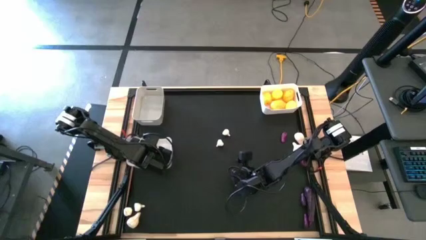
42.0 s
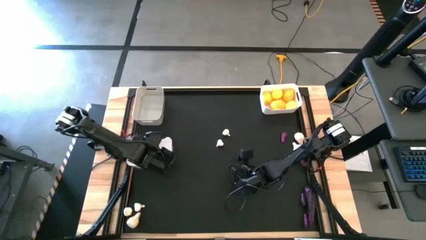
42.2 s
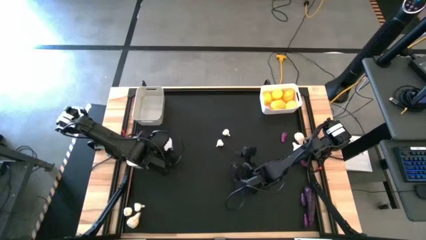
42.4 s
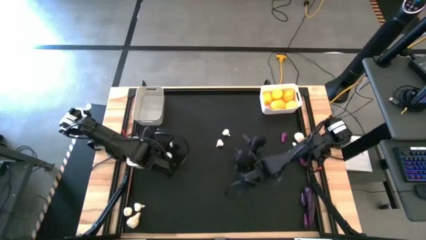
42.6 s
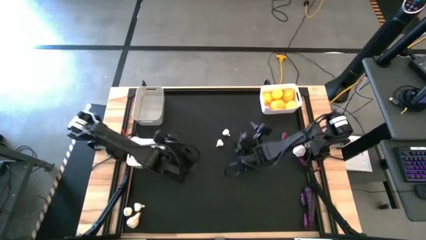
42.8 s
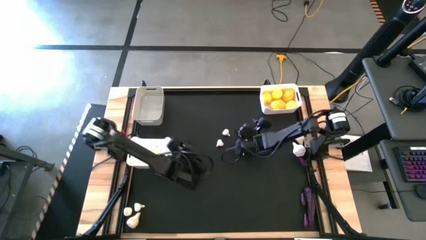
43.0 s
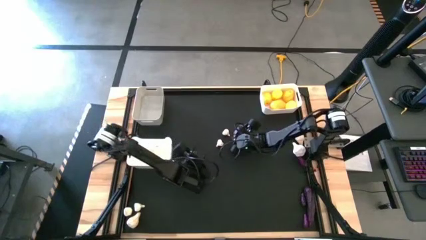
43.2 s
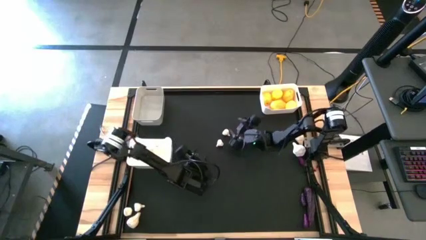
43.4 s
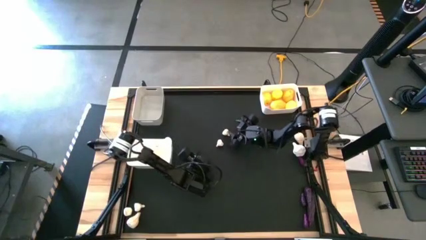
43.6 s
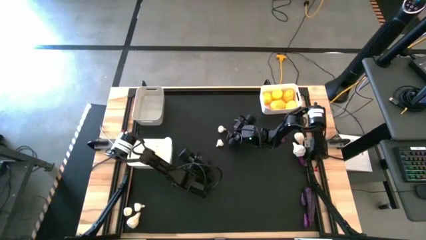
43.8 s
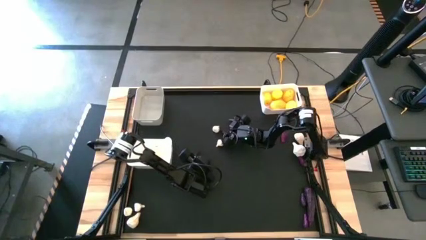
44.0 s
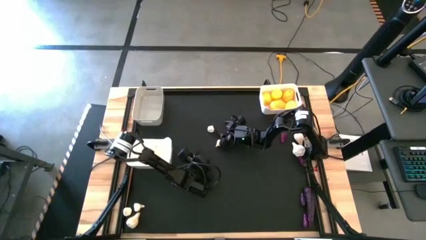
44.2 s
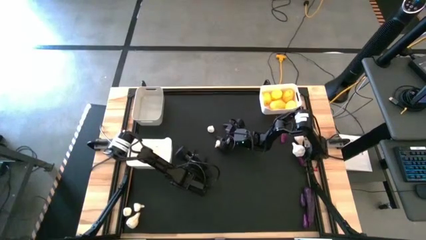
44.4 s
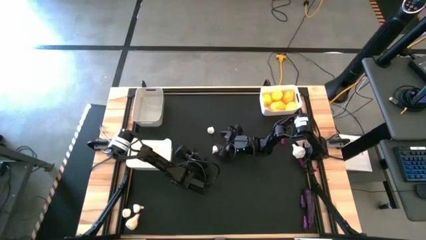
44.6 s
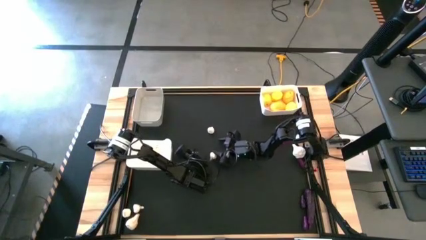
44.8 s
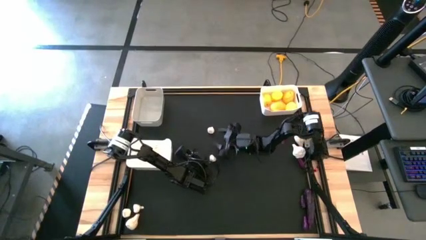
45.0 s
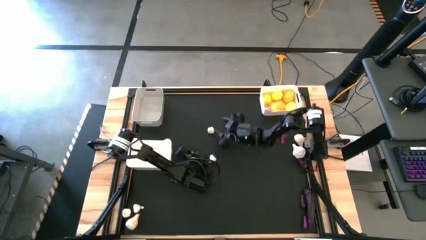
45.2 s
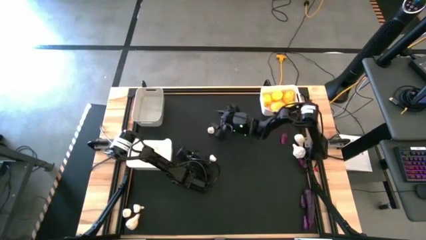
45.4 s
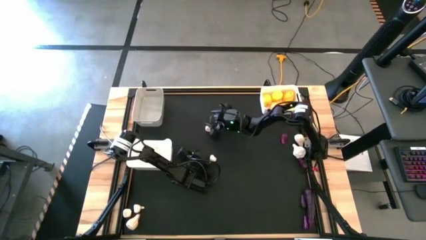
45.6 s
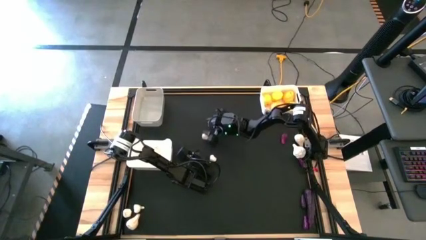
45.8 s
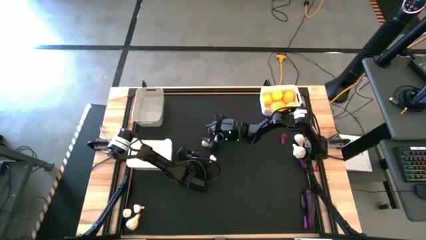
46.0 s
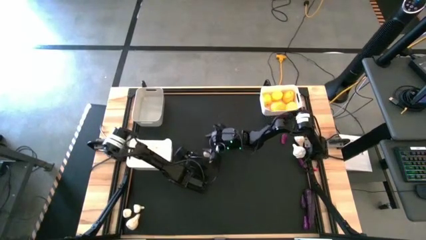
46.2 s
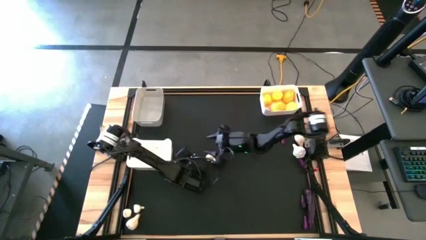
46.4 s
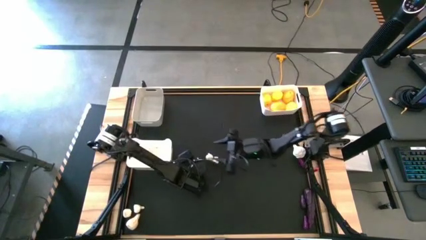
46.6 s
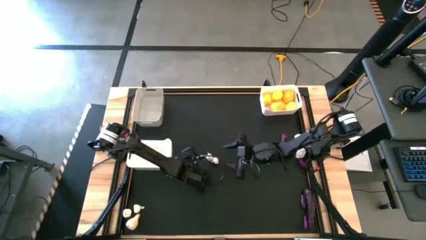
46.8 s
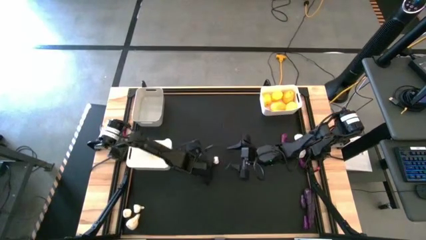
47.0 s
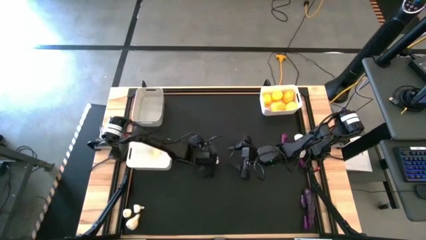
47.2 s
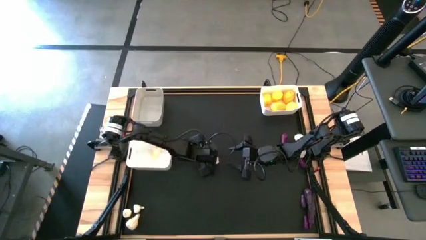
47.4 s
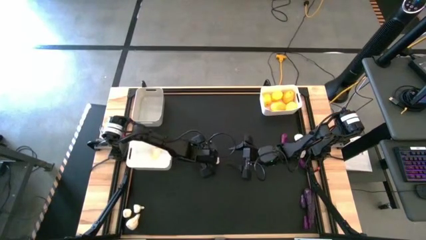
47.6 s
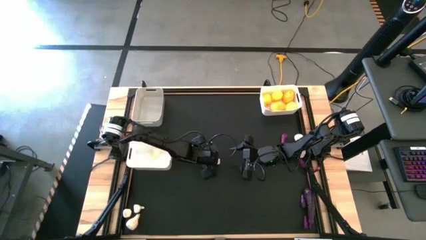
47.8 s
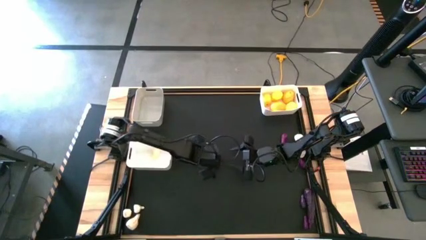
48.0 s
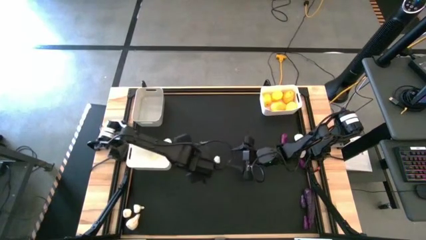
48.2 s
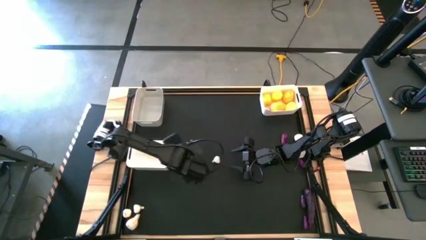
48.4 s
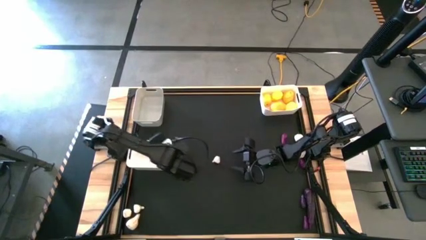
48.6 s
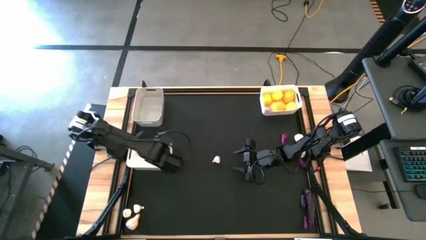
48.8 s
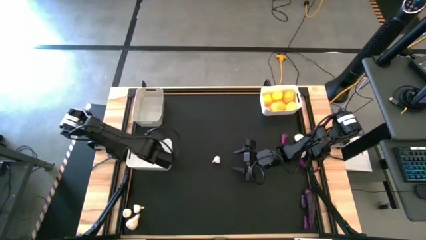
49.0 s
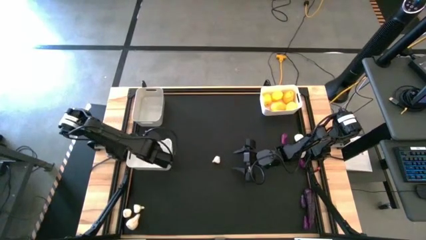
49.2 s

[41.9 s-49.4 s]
Task: Sort produce into baskets
Put the white garlic into the bottom white bin

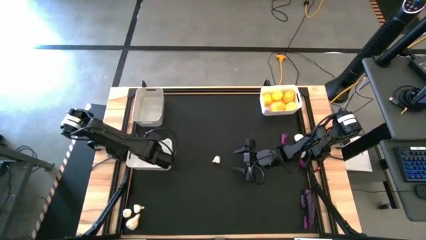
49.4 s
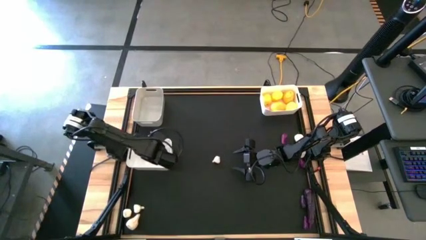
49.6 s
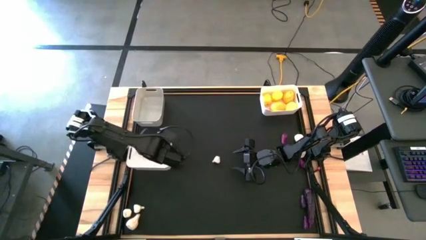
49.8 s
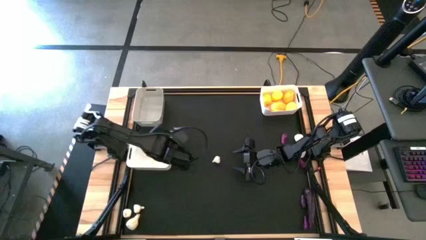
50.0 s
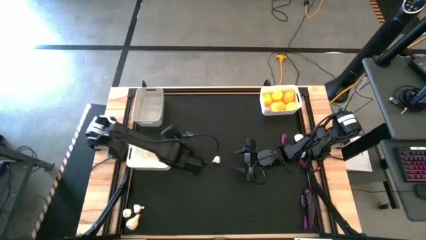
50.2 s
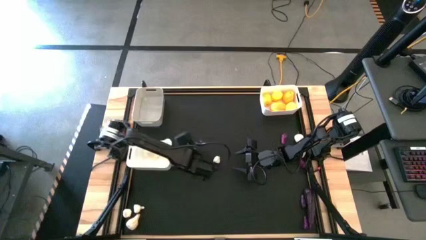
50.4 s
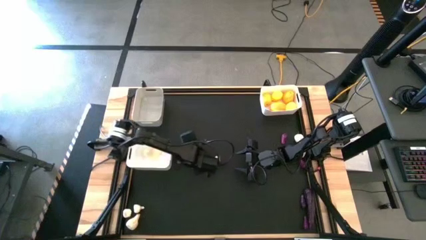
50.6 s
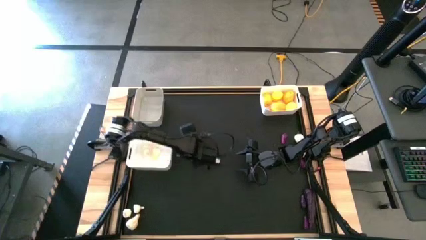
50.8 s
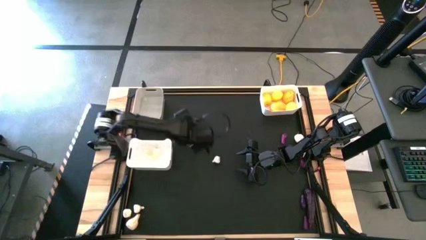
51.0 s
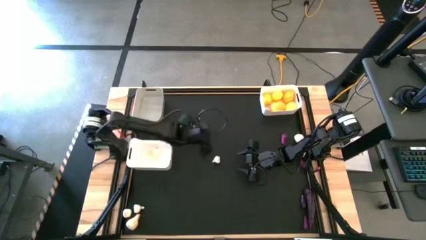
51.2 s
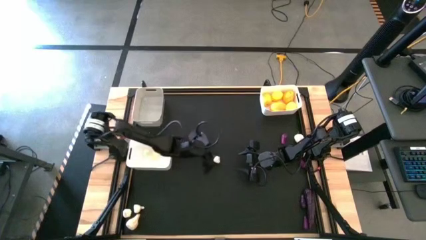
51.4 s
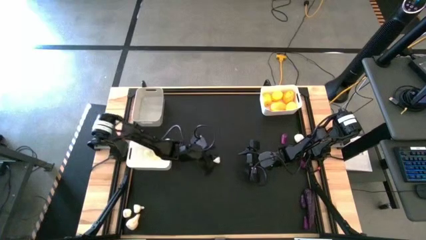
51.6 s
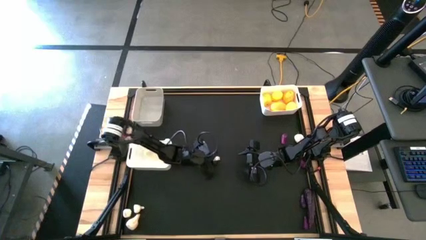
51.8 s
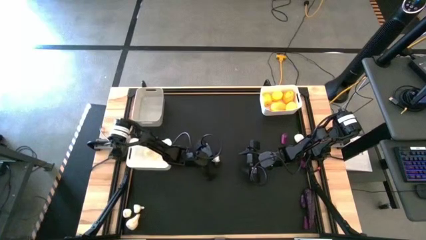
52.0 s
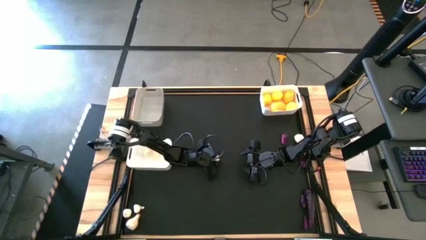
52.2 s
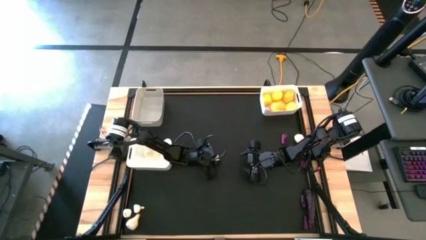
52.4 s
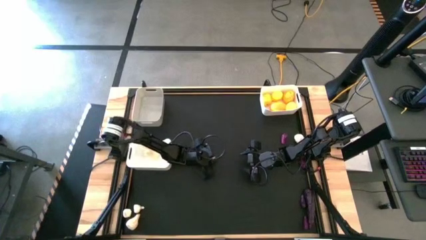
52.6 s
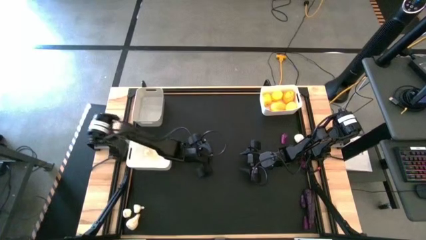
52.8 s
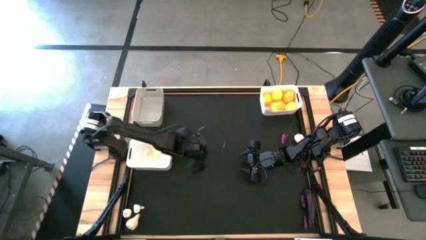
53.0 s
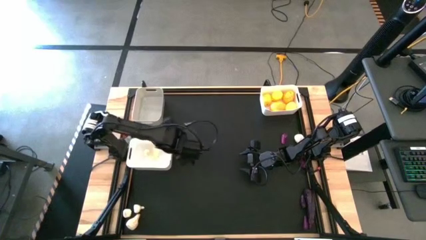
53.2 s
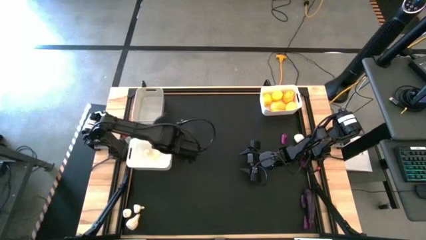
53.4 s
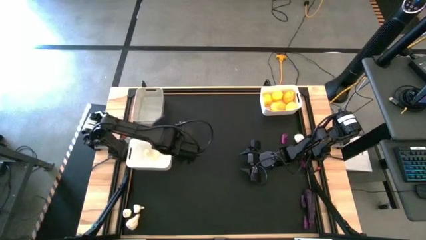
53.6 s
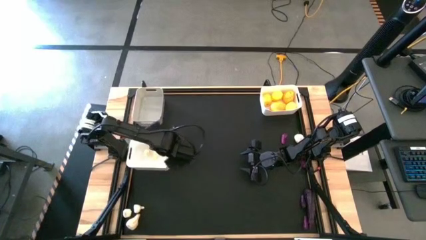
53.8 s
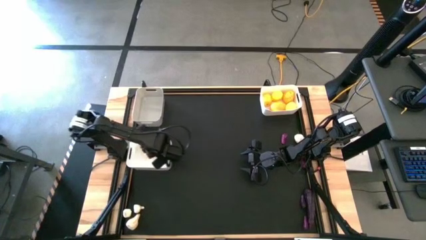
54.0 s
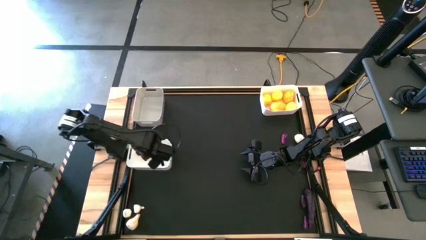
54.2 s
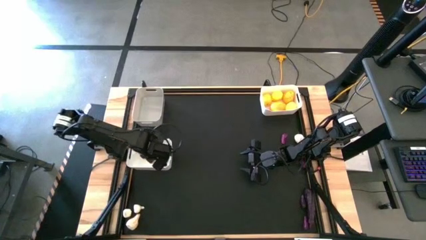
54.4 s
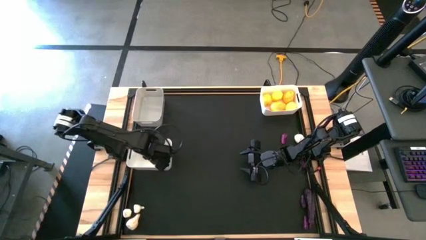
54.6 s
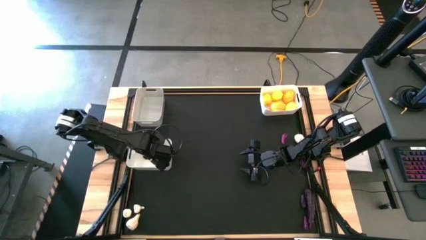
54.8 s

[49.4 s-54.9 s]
Put the white garlic into the bottom white bin

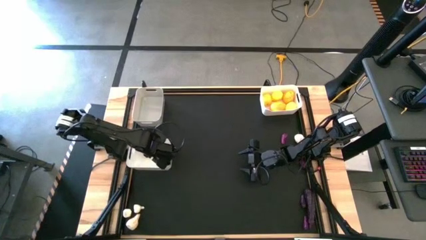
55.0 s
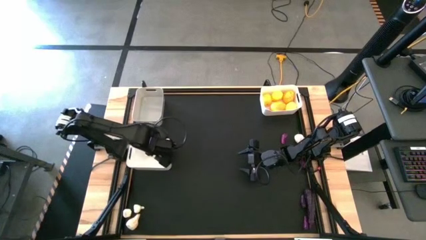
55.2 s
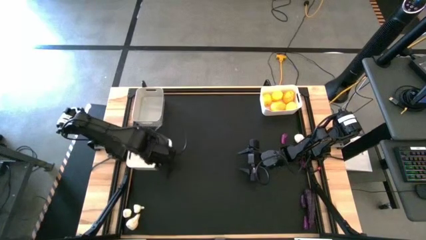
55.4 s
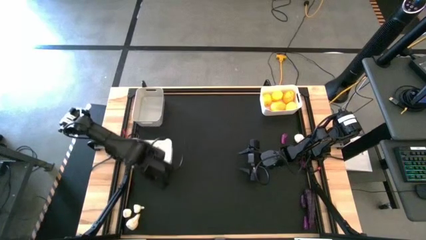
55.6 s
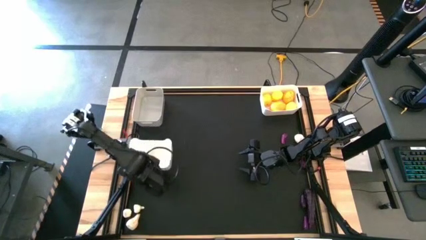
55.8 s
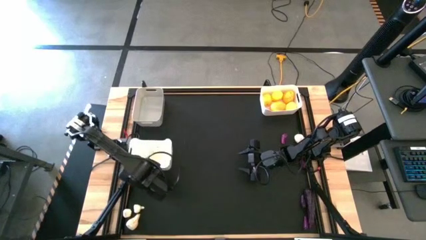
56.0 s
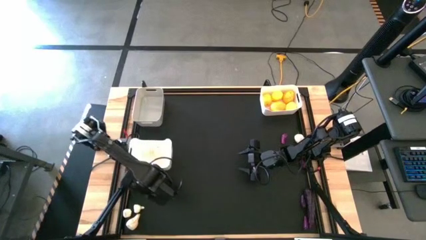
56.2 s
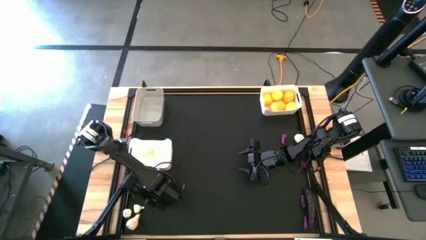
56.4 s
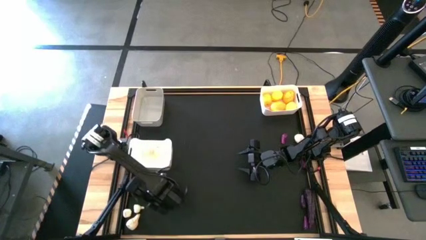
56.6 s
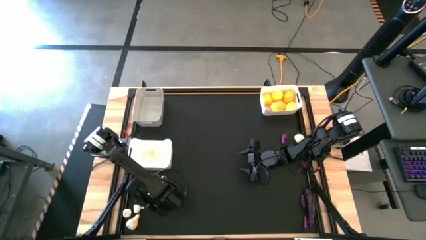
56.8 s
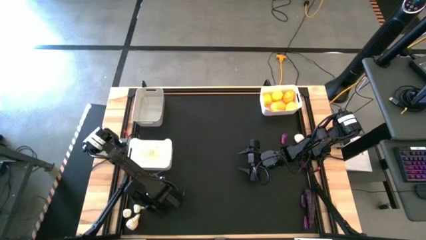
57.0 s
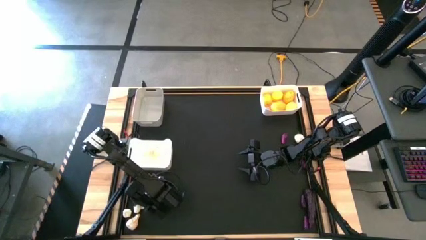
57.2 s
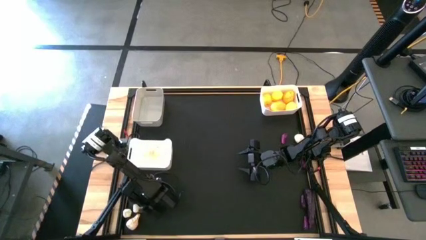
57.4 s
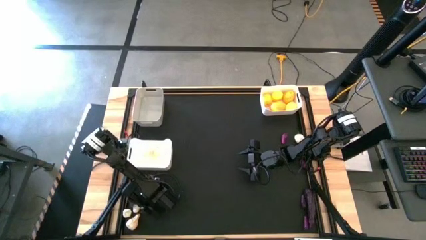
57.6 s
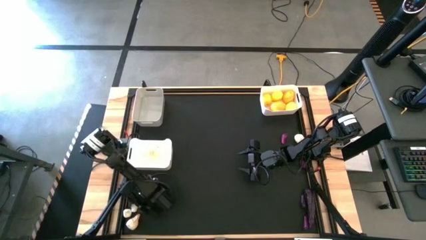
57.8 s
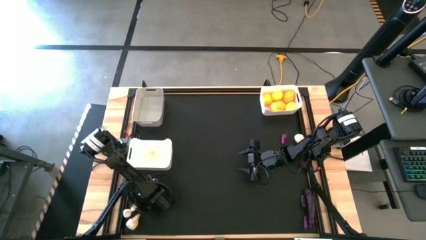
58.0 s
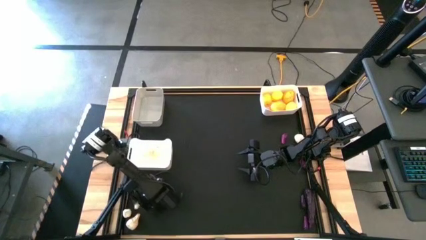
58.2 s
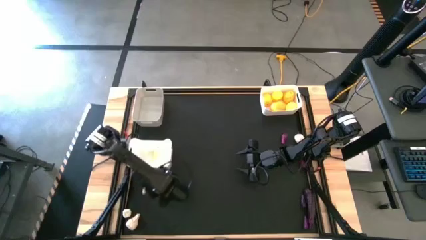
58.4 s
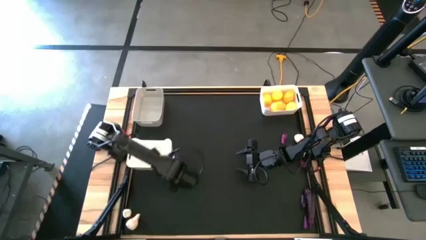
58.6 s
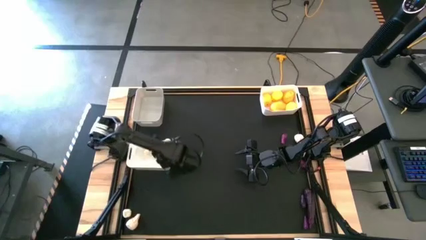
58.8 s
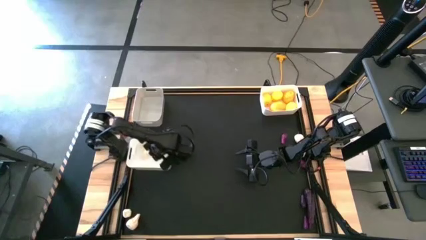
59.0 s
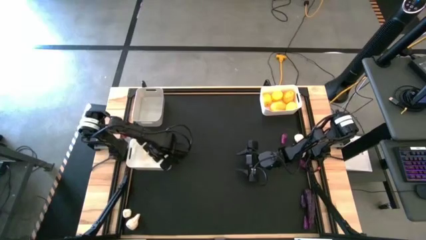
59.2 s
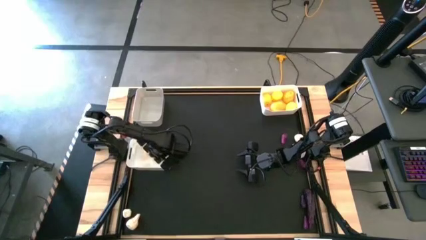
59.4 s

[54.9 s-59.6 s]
Put the white garlic into the bottom white bin
